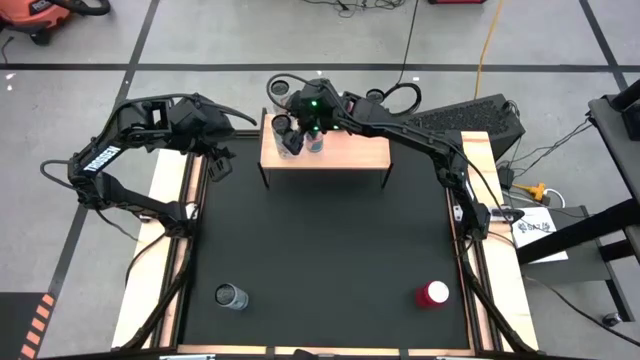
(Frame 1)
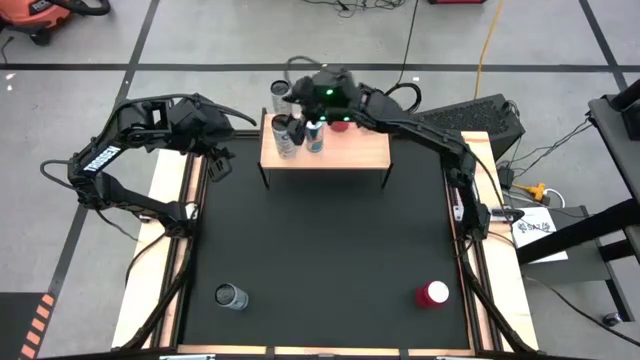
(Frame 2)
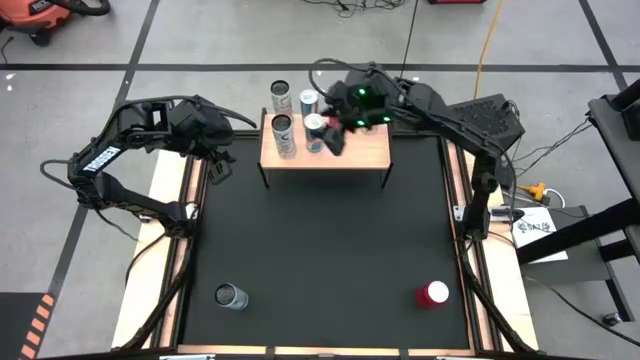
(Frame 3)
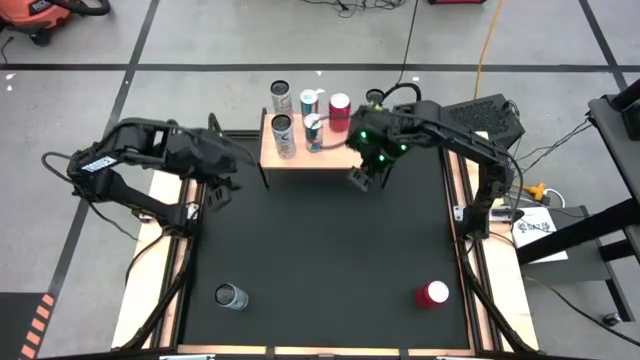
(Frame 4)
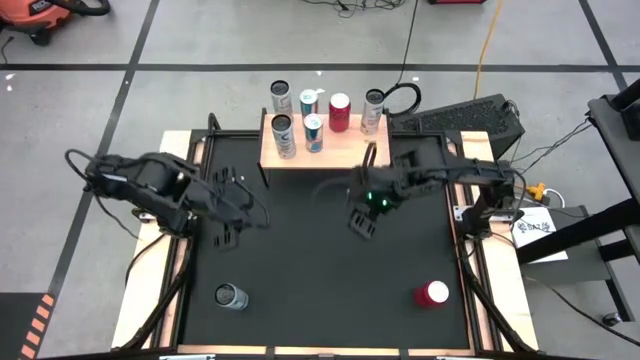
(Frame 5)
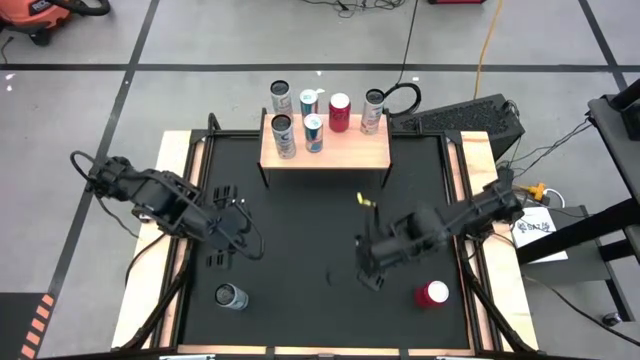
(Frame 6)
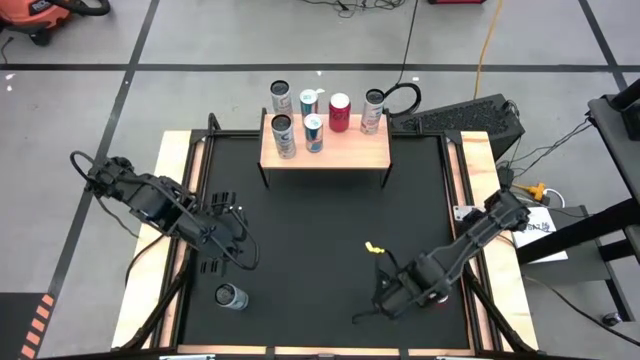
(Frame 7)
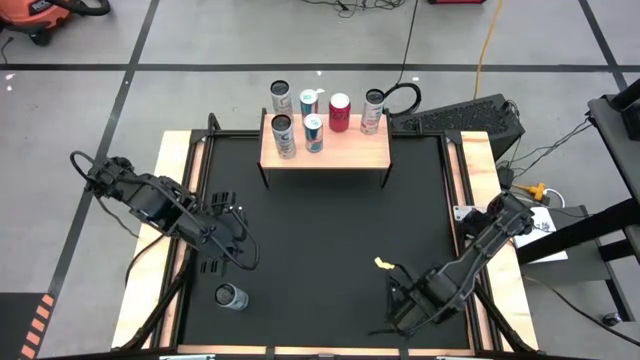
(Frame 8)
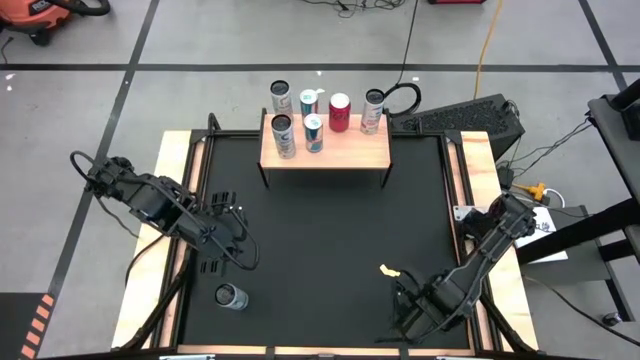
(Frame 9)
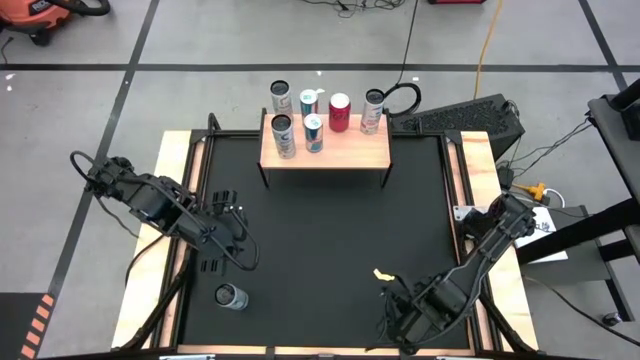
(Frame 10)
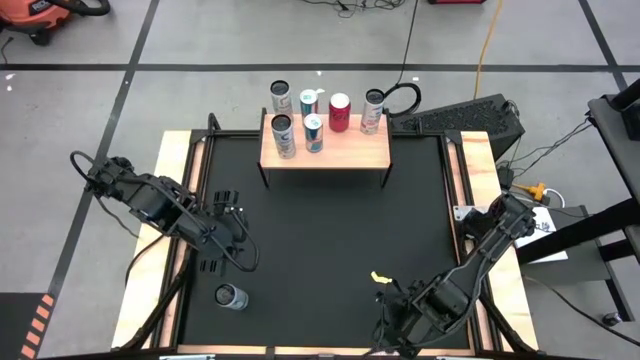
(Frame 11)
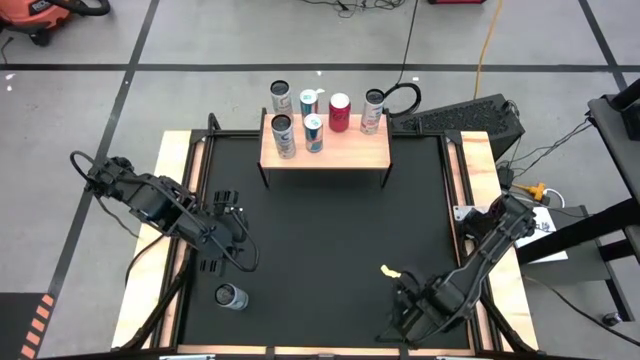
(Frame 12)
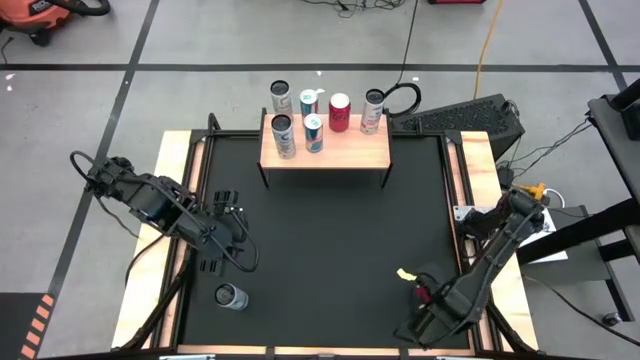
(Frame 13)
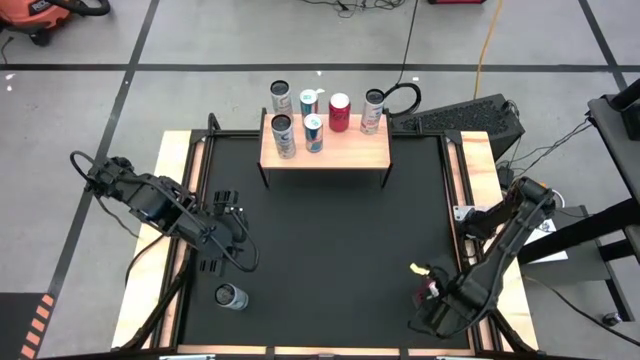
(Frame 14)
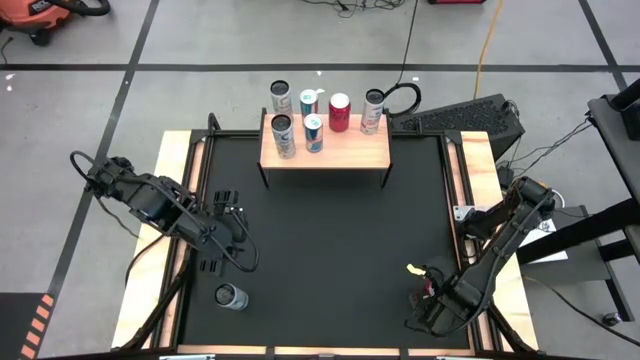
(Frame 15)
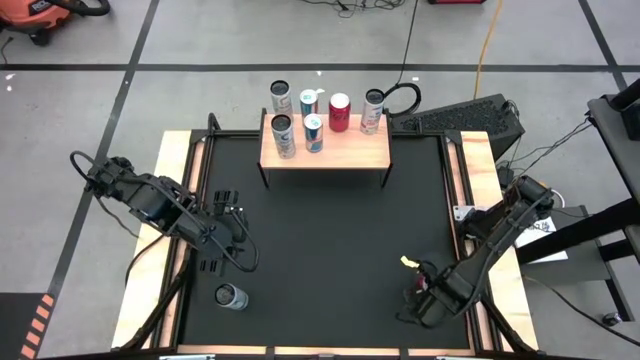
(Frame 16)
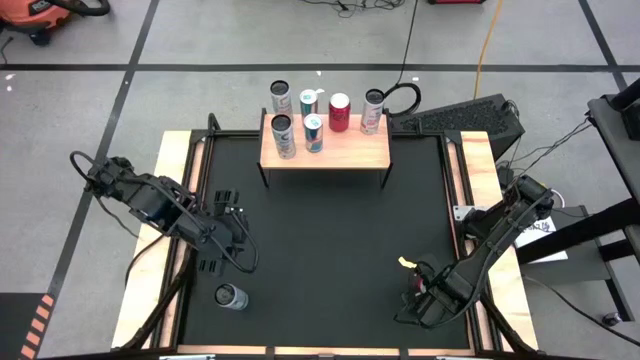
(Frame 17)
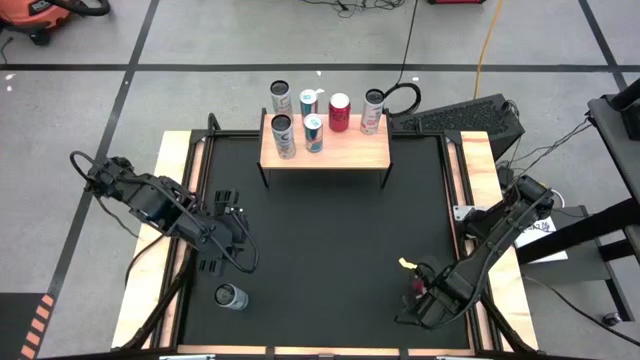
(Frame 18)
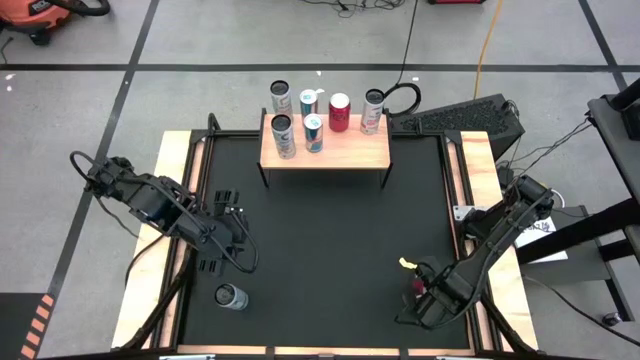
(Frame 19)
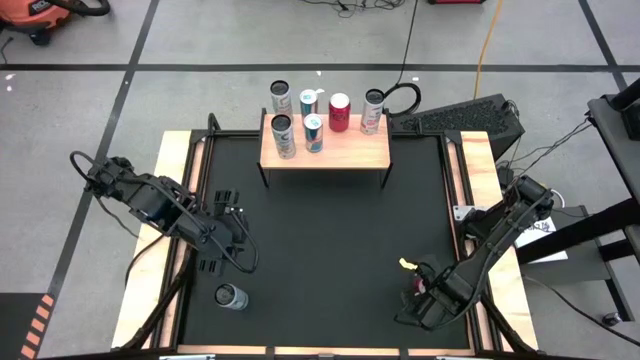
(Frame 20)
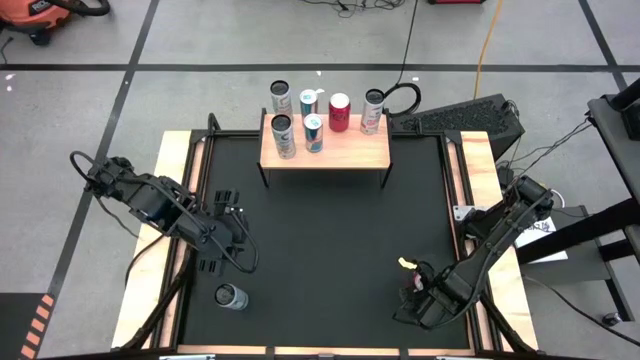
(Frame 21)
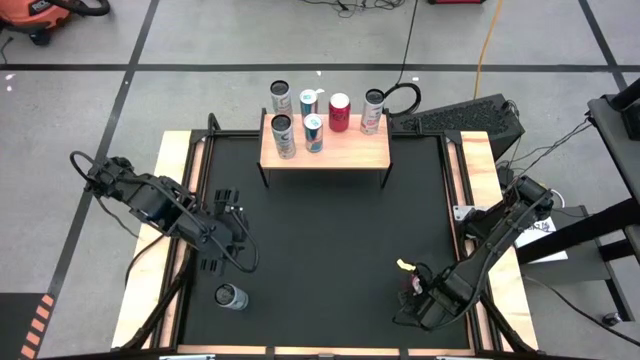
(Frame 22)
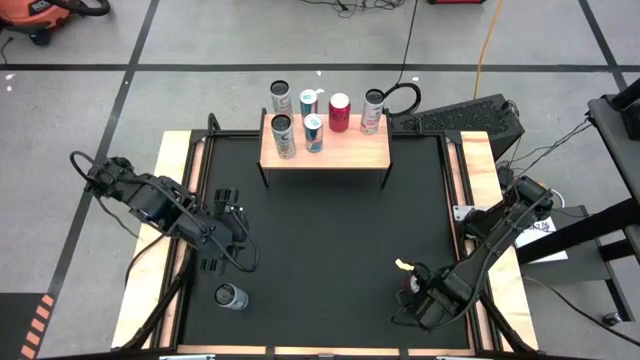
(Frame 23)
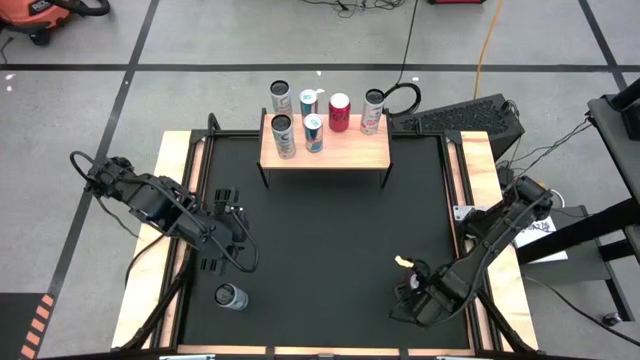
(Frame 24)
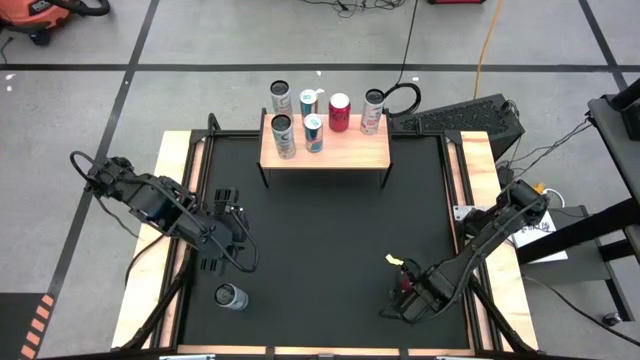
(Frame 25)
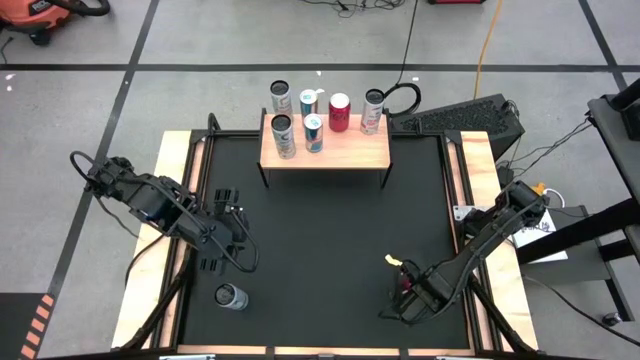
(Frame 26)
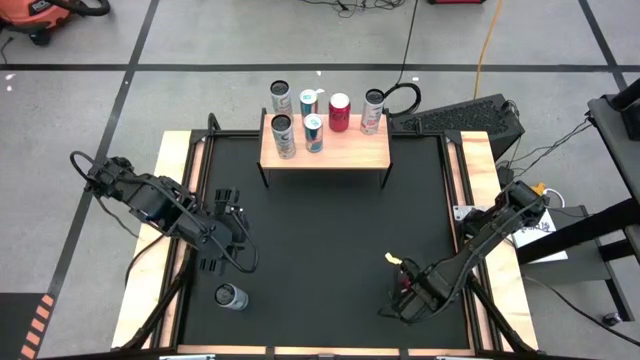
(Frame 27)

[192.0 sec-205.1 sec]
Task: Place canned beverage on shelf
Put the red-black soda can on the shelf

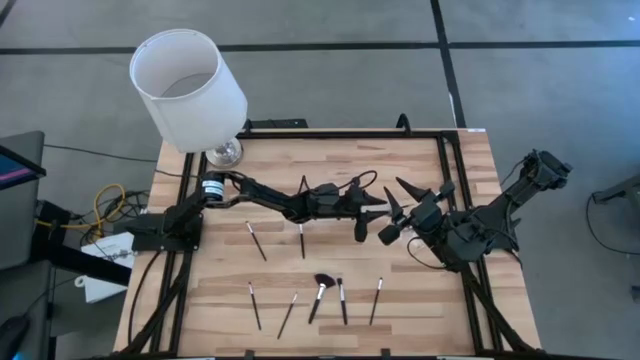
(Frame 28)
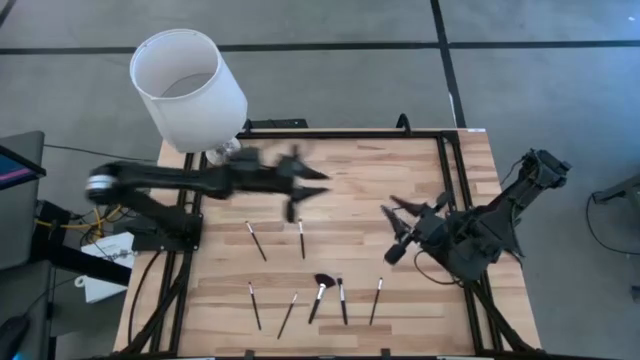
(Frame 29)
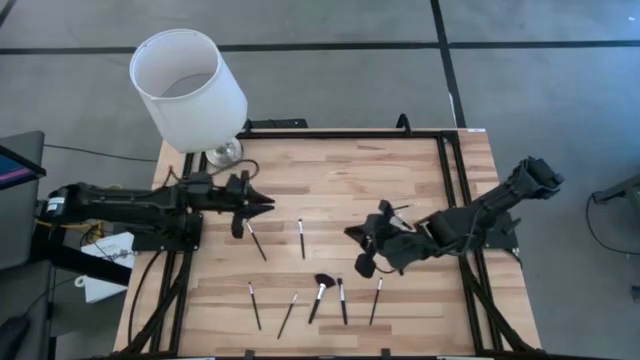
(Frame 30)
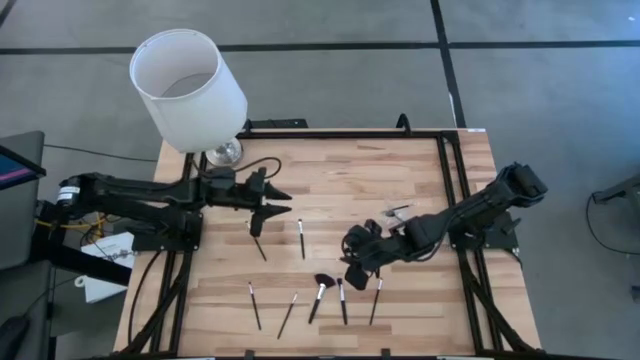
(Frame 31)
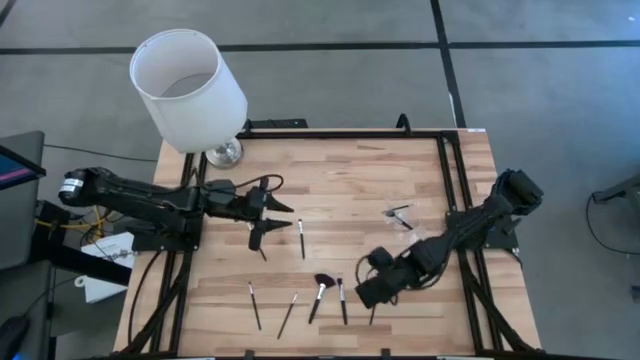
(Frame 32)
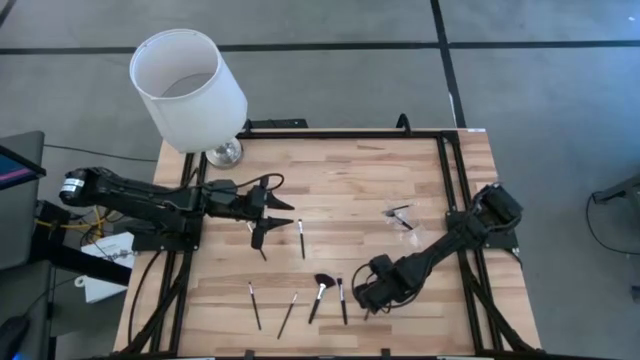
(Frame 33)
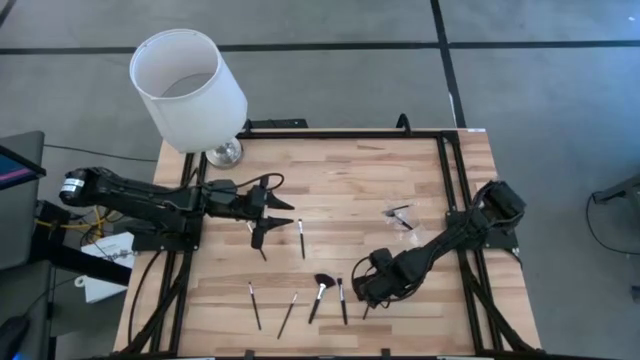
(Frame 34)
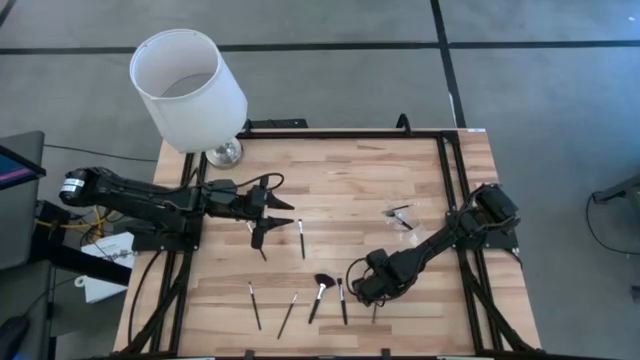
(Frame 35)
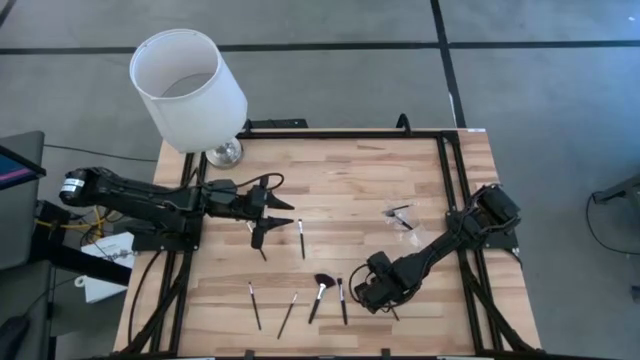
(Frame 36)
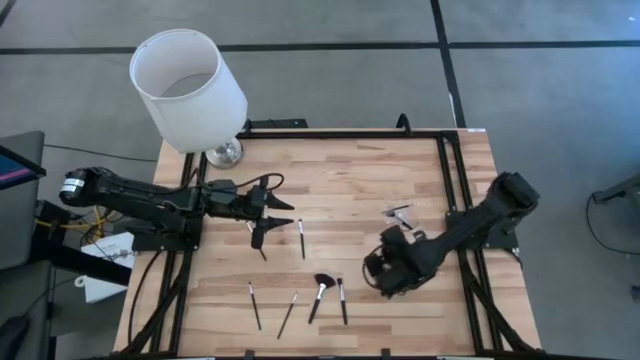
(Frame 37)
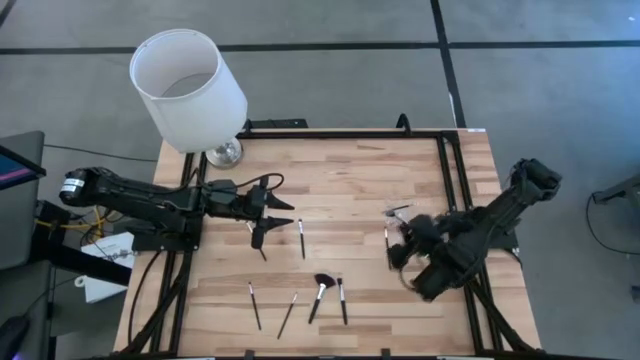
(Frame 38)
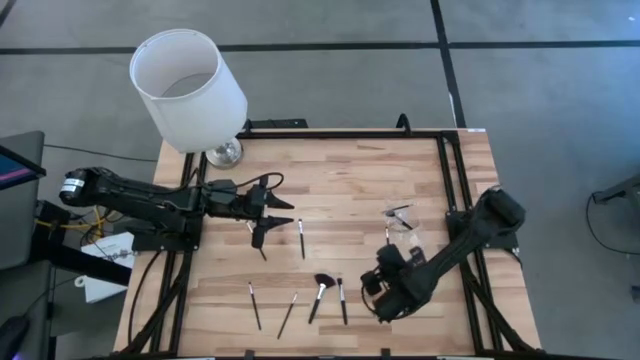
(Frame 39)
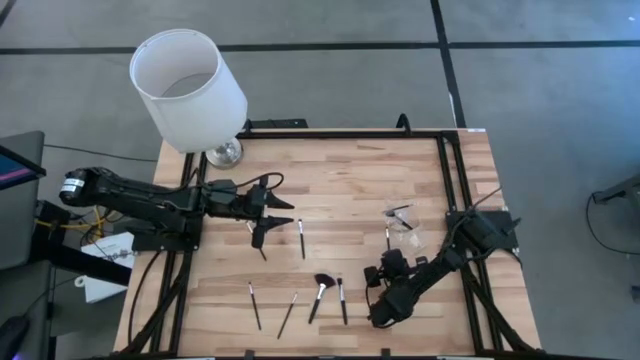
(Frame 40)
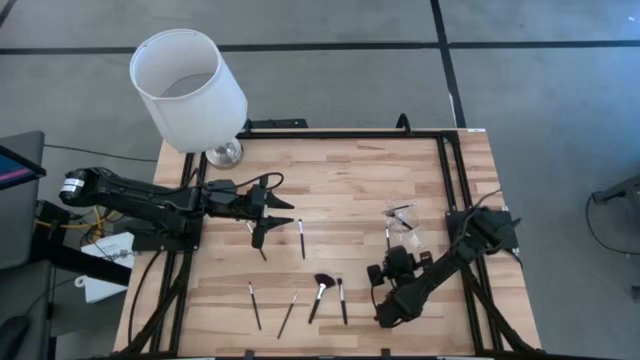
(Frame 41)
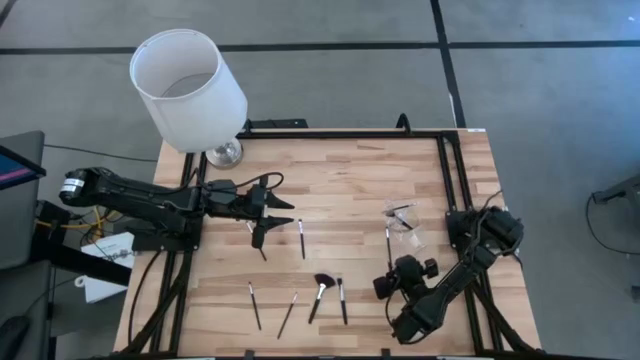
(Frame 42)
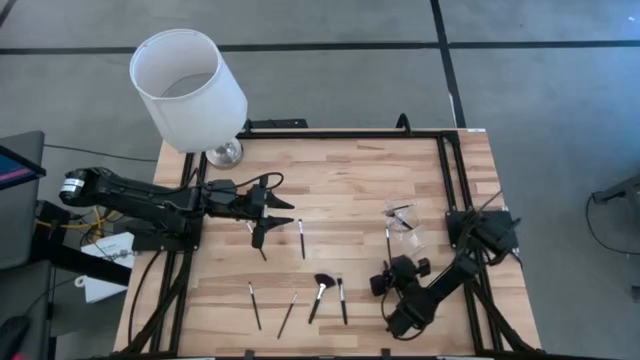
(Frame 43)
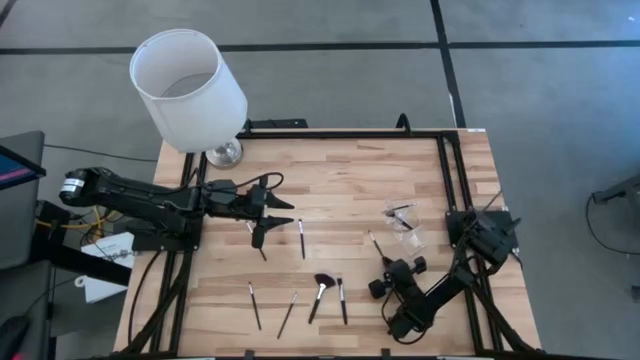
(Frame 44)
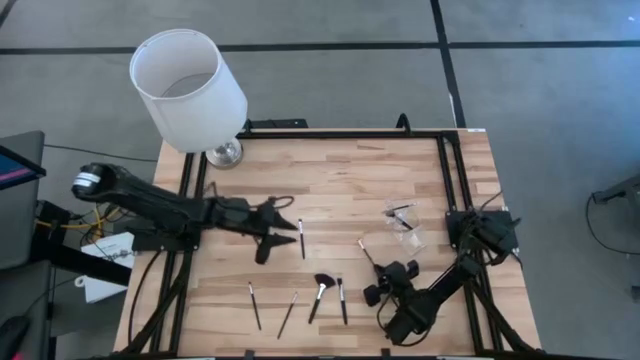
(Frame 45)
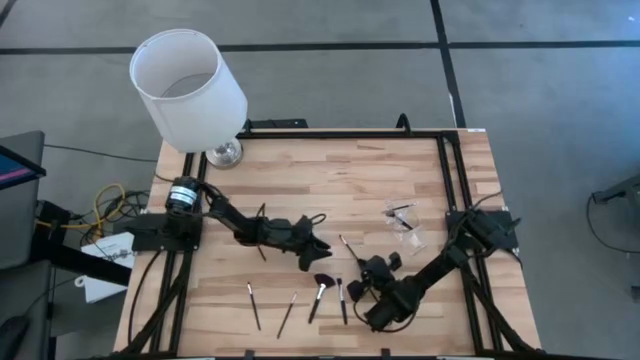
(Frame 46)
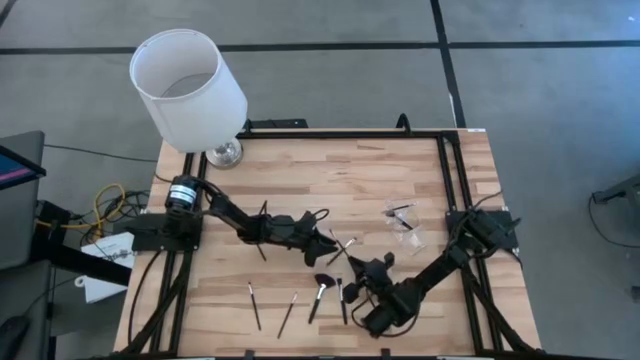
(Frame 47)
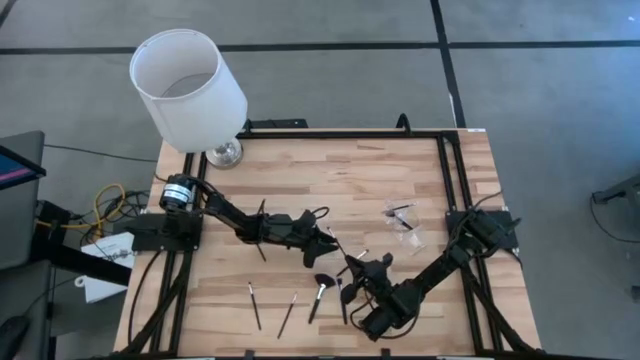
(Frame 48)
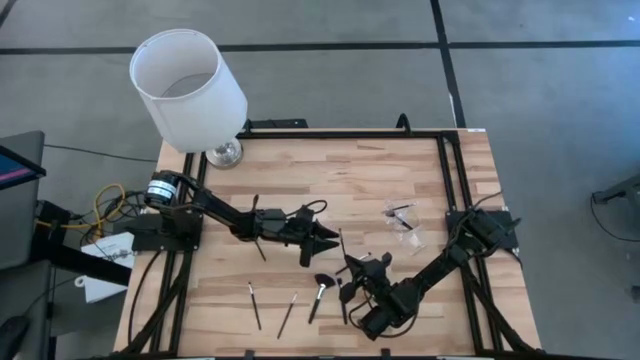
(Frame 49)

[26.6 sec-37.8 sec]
Task: Put items in baskets/containers
Put the eyeshadow brush into the transparent organizer
